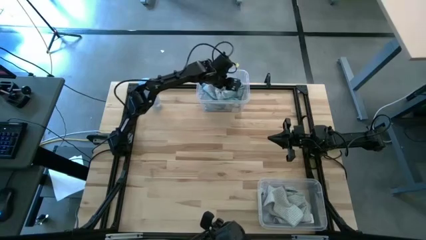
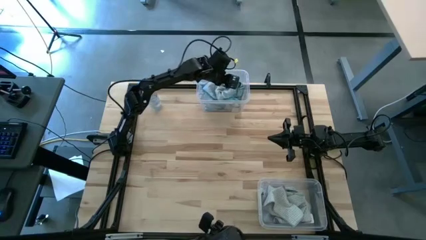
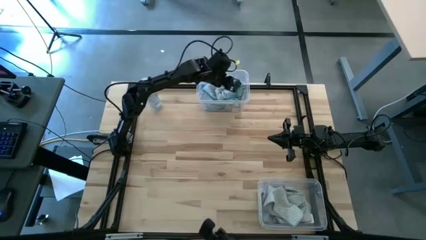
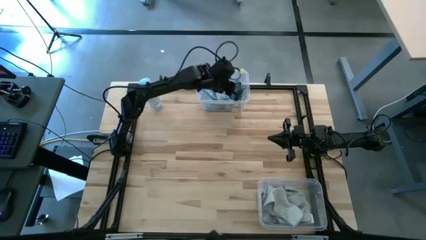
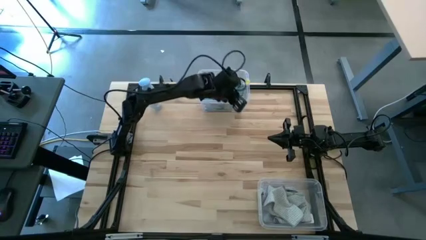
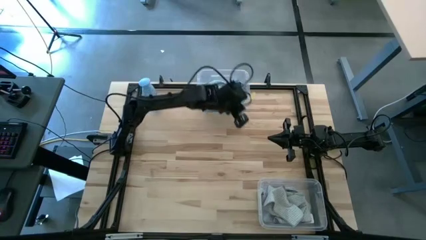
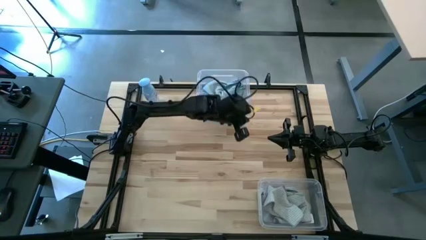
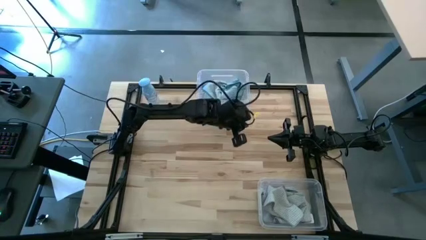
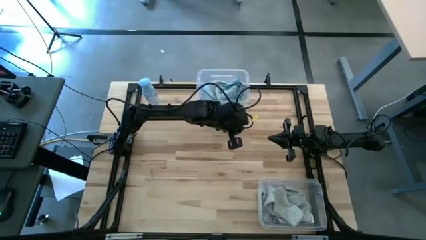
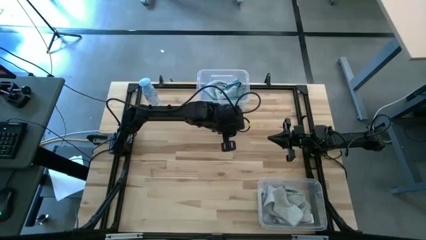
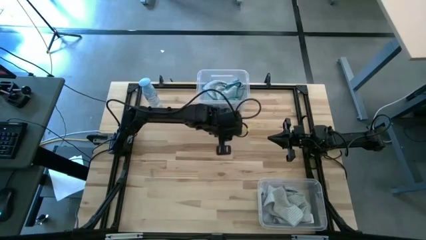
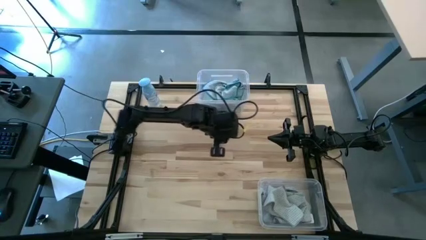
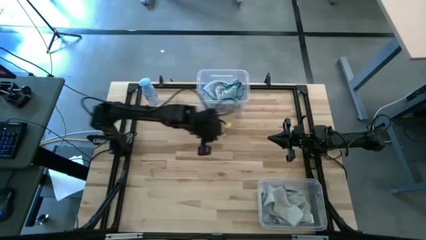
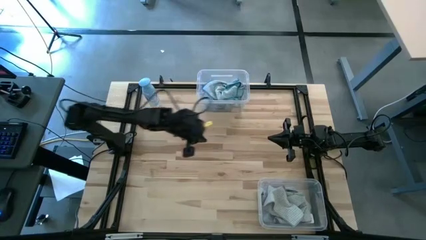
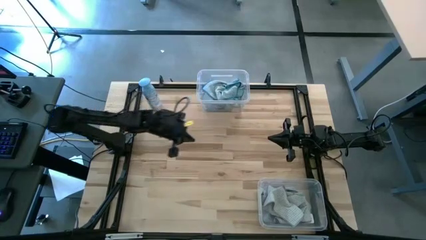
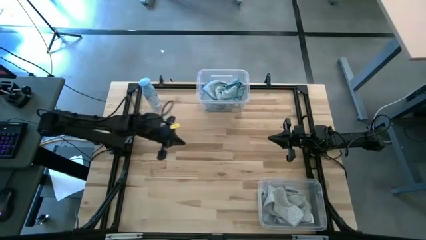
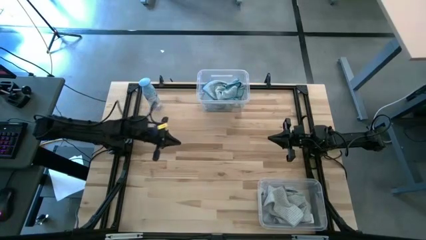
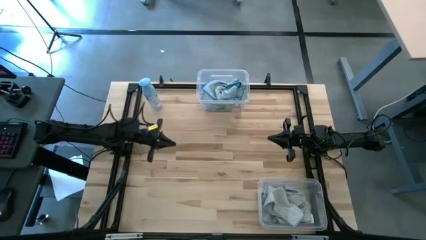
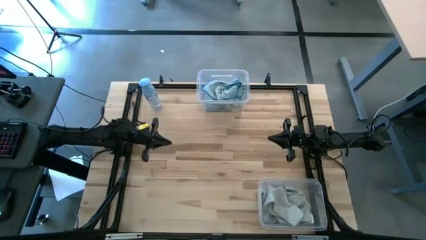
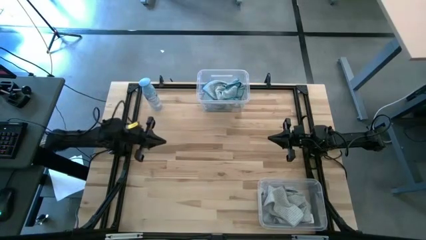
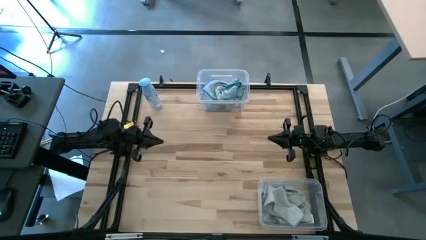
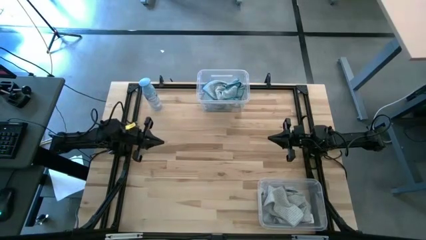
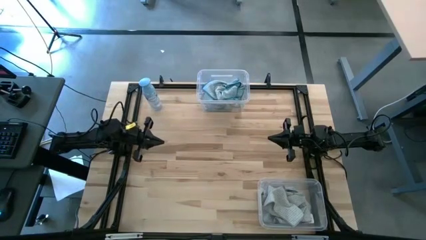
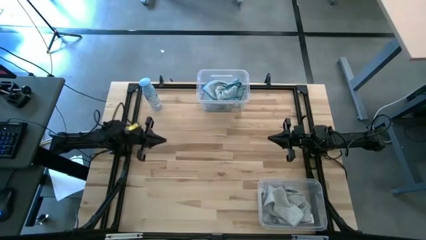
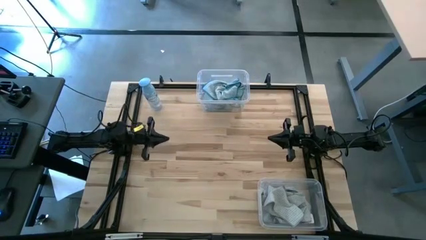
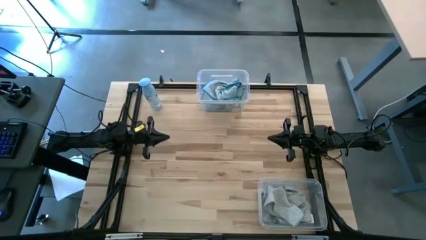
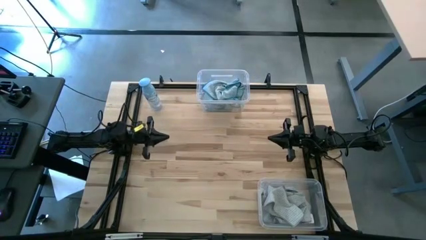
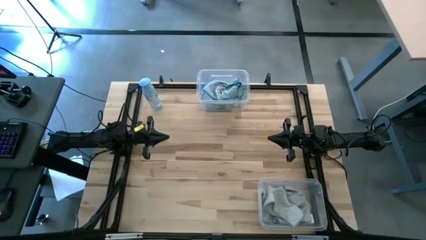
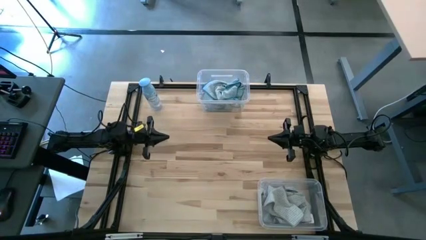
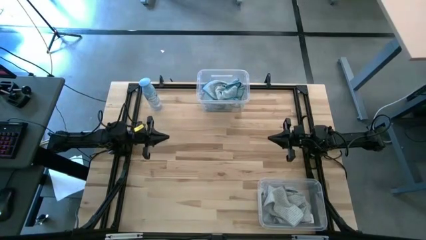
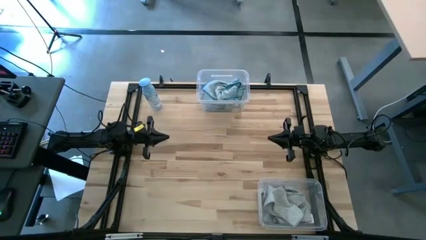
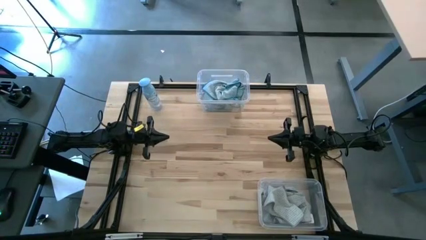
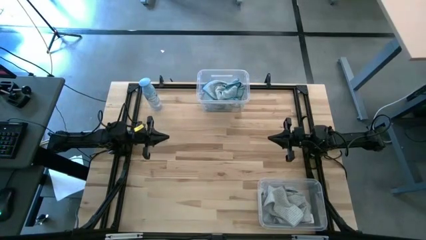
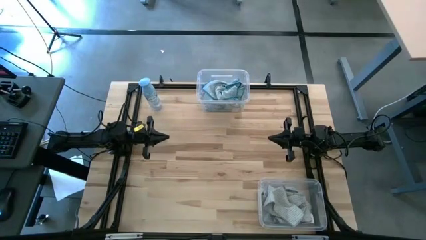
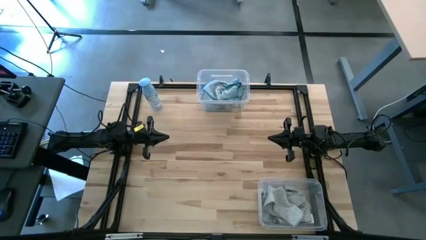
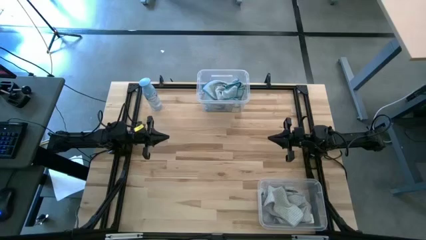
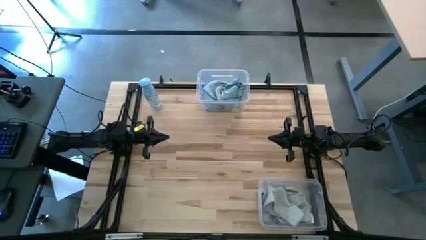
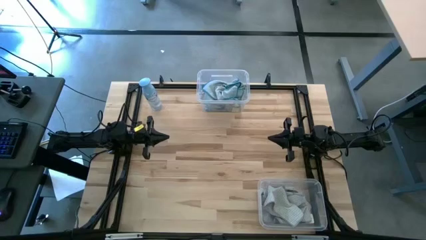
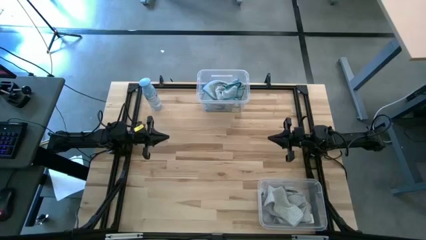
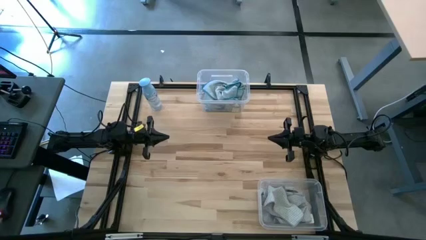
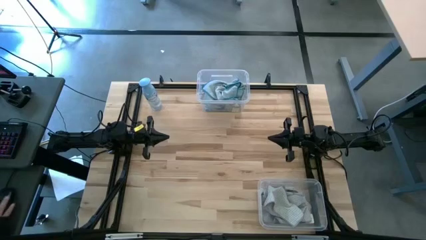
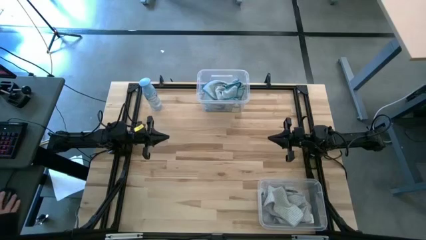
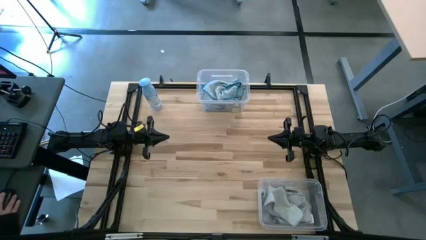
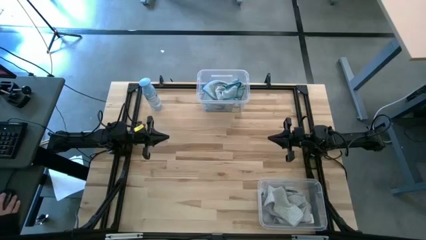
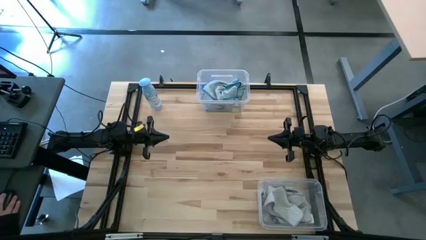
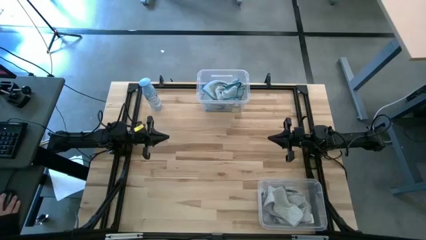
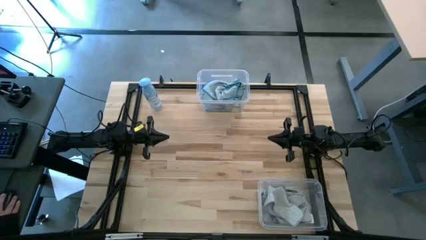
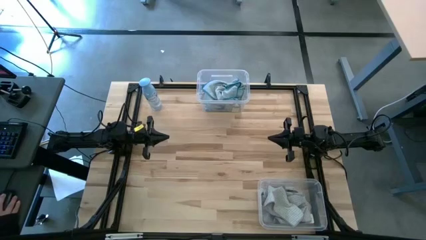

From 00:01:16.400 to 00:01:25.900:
Task: Sort microfiber towel by color & place in baskets
Return to Home Position

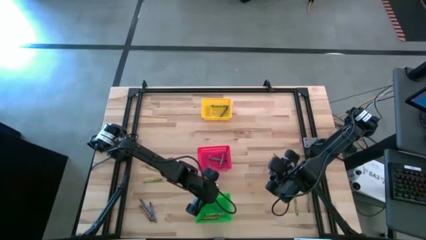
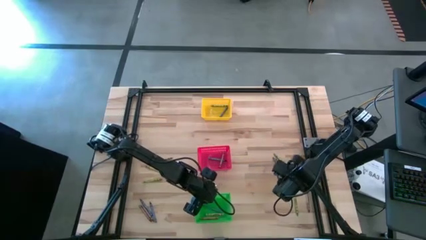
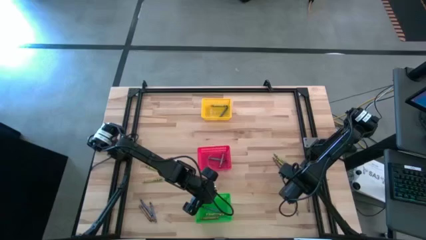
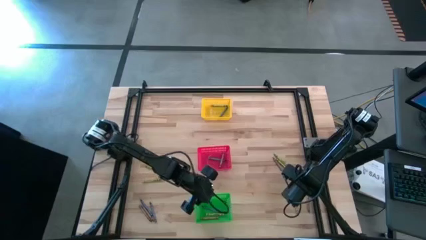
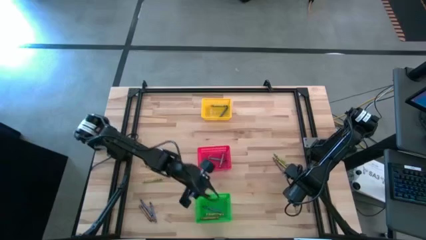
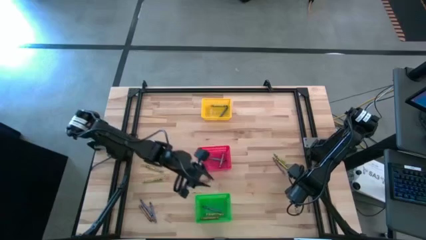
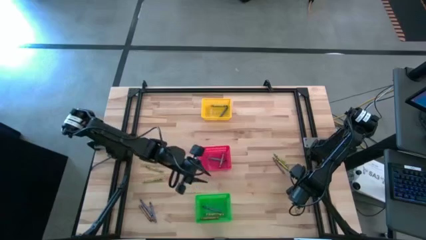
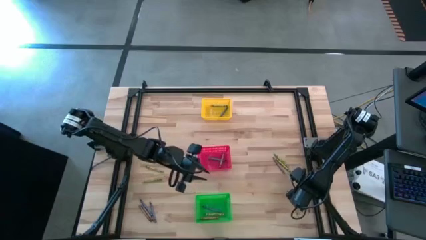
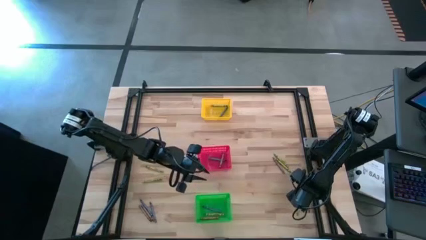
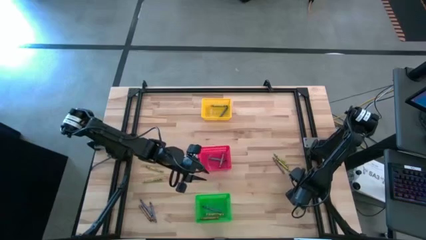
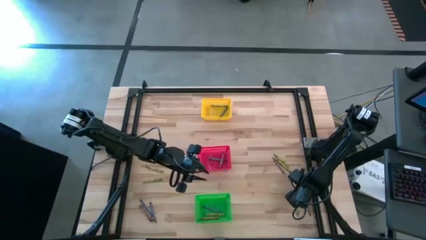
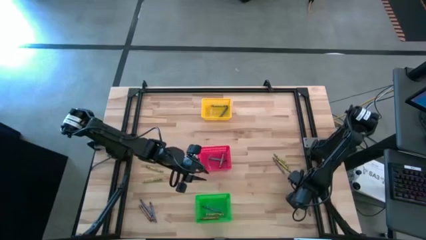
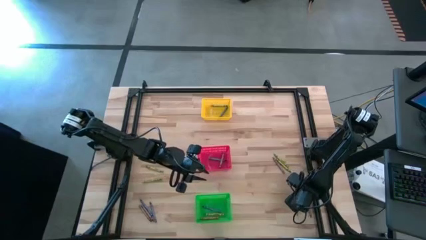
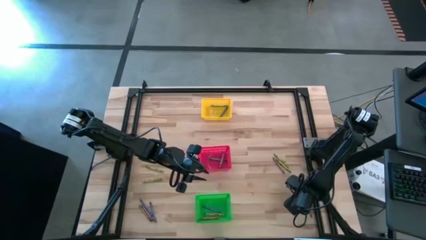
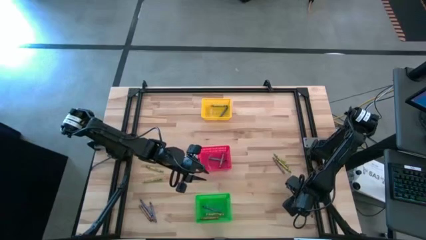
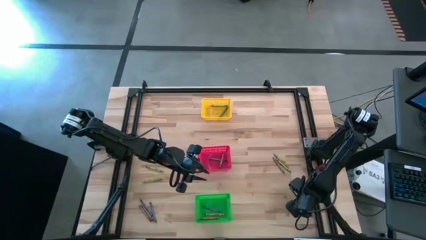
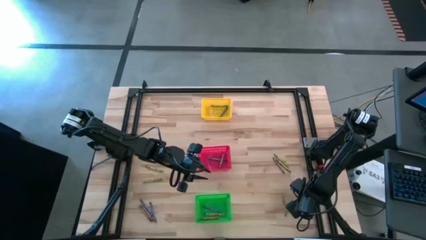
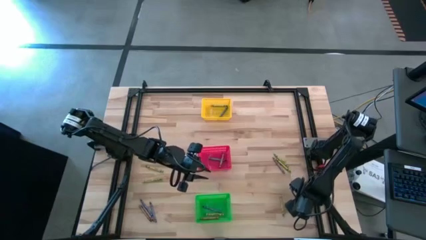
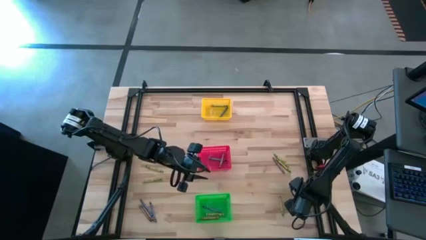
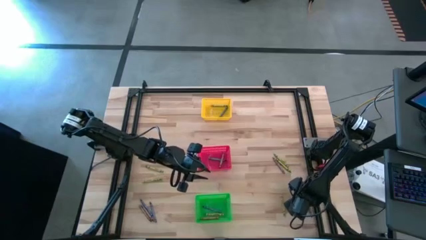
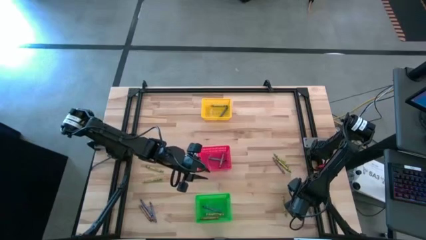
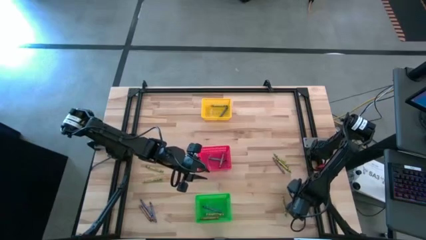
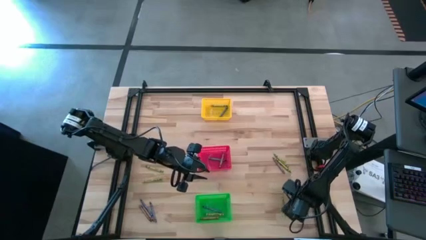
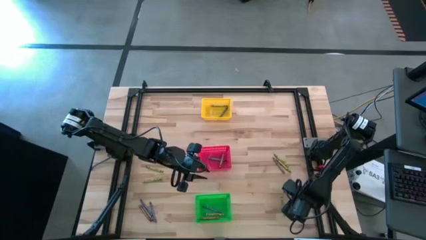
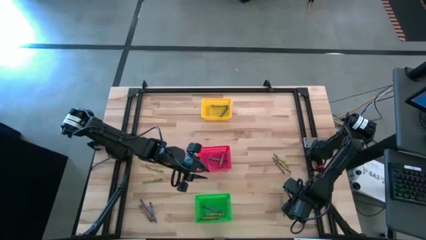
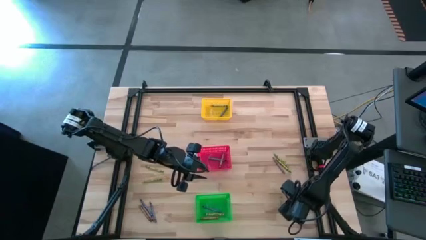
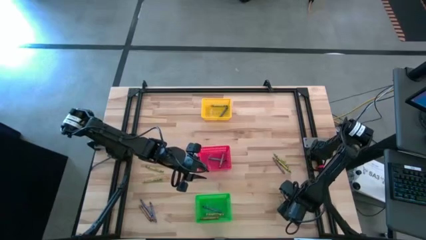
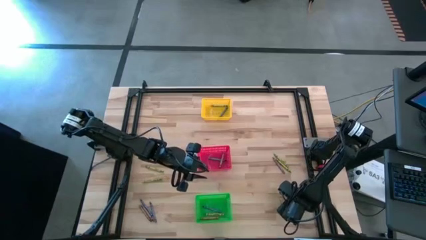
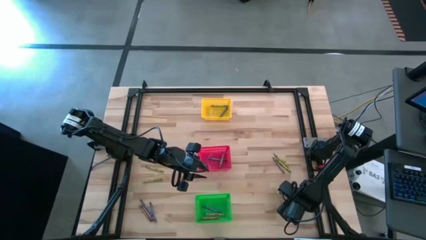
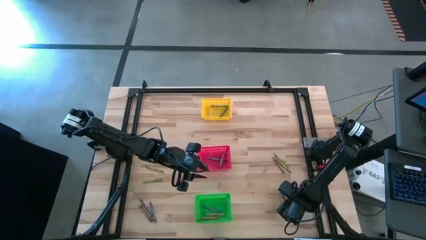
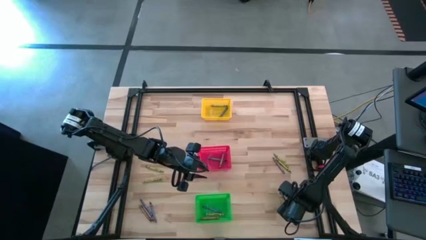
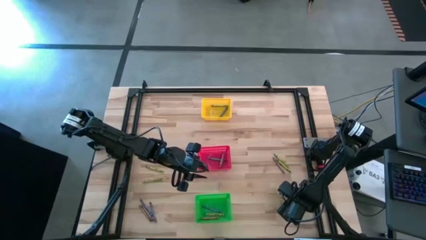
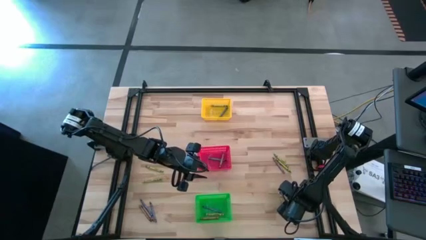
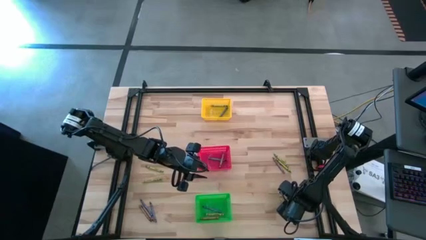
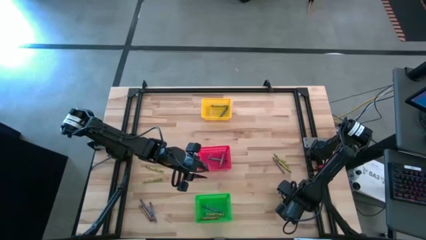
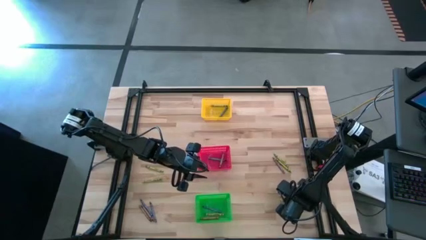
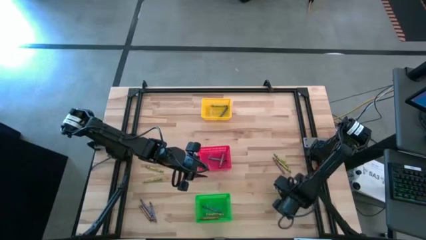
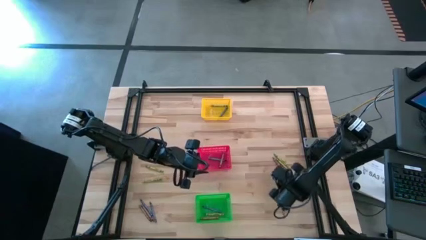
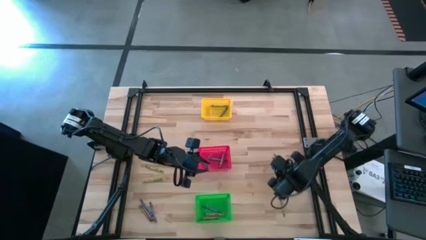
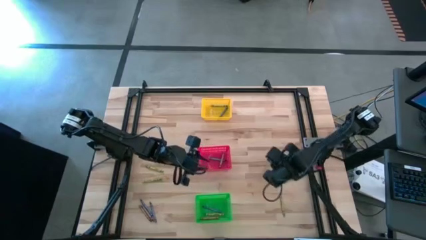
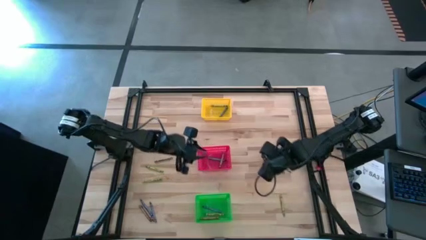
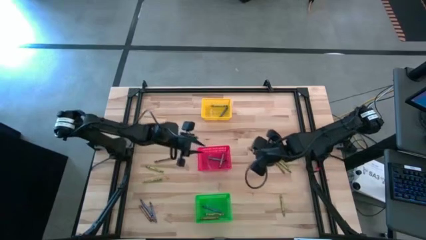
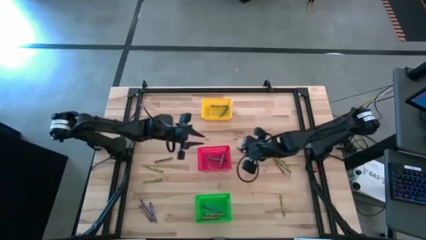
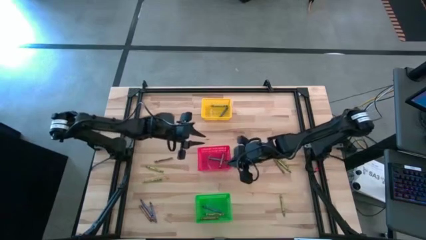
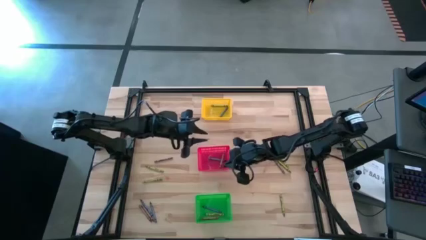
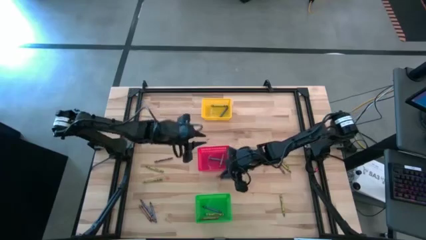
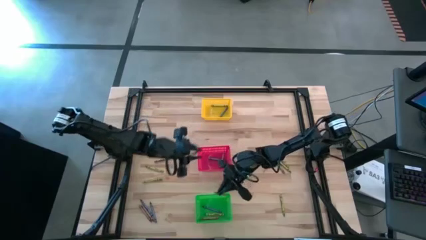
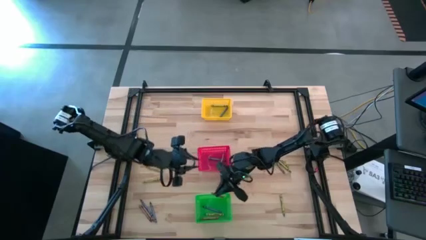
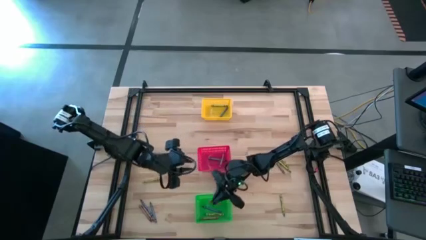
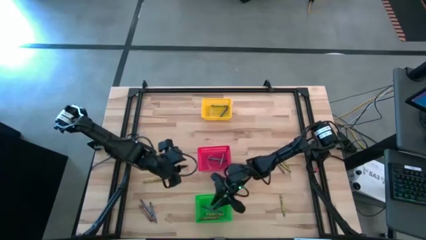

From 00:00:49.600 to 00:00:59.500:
Task: Sort crayons
Put the brown crayon into the green bin
